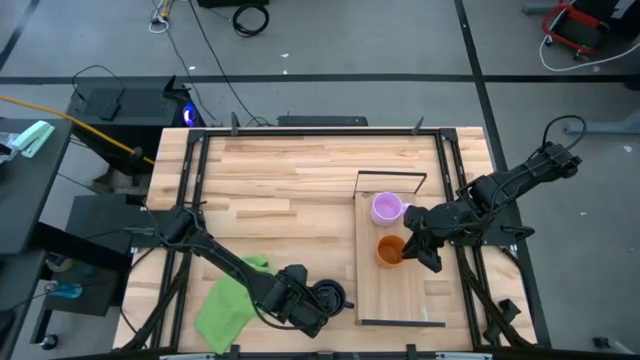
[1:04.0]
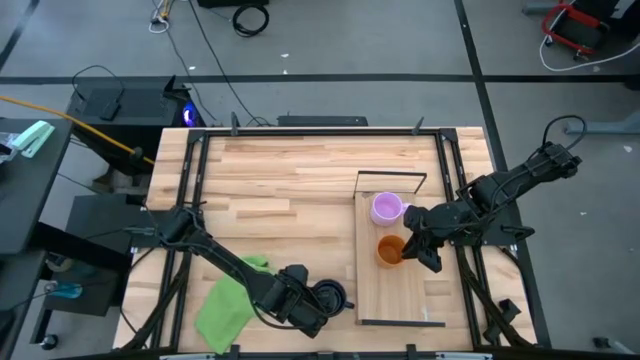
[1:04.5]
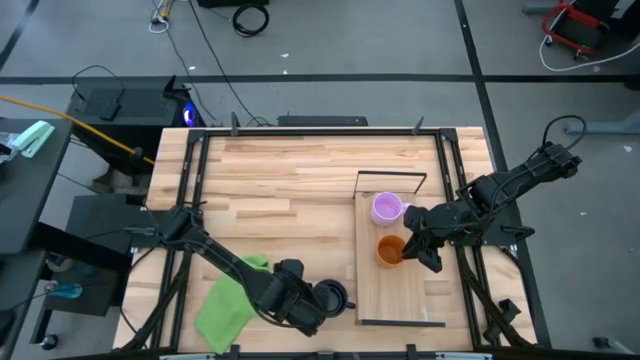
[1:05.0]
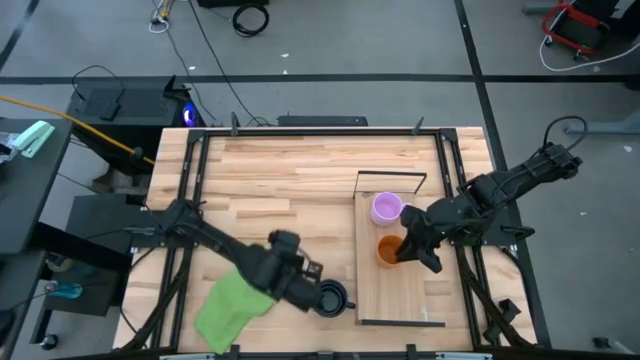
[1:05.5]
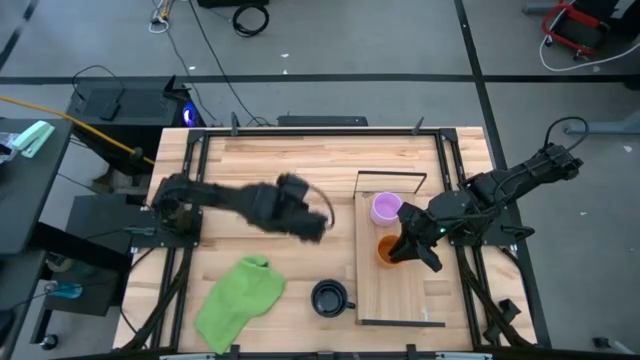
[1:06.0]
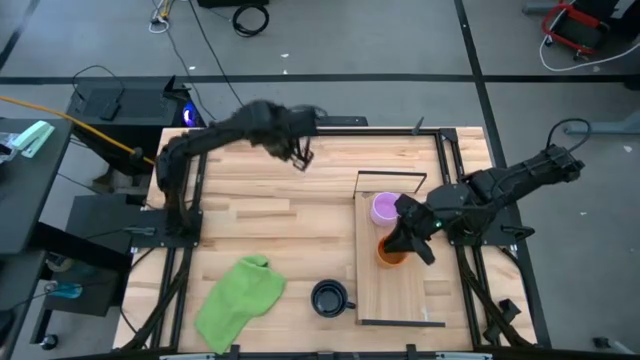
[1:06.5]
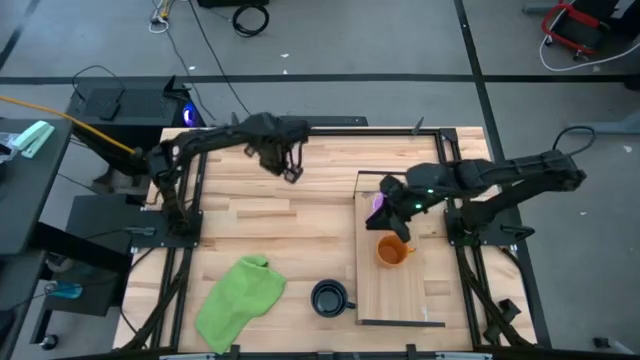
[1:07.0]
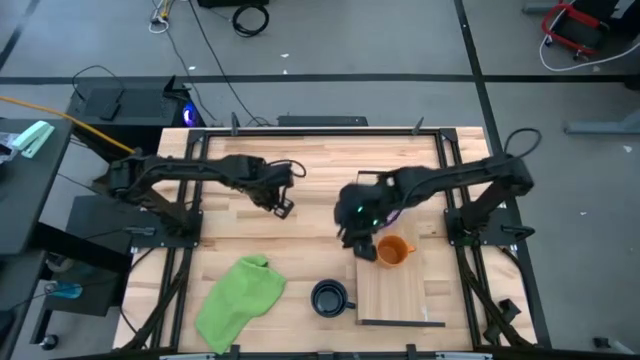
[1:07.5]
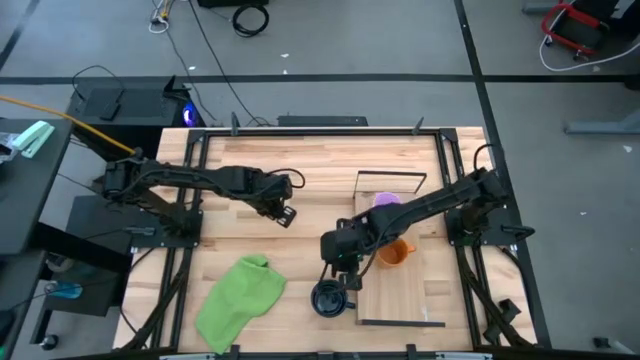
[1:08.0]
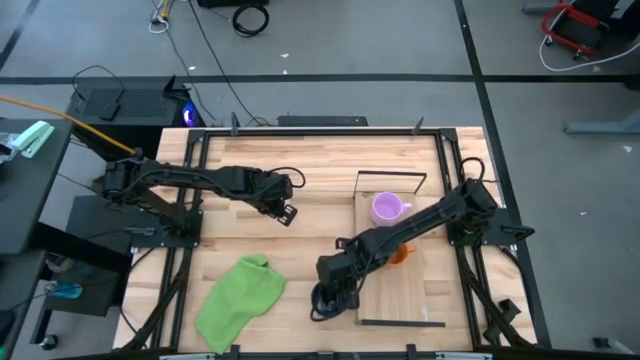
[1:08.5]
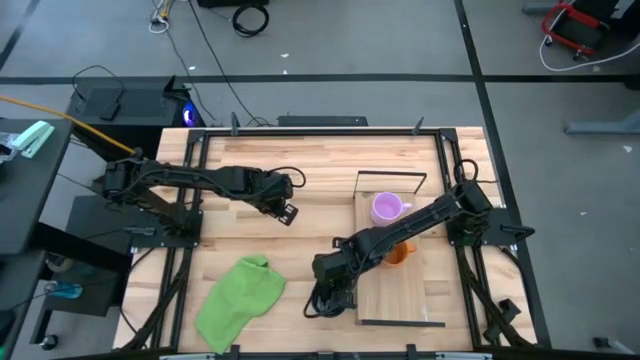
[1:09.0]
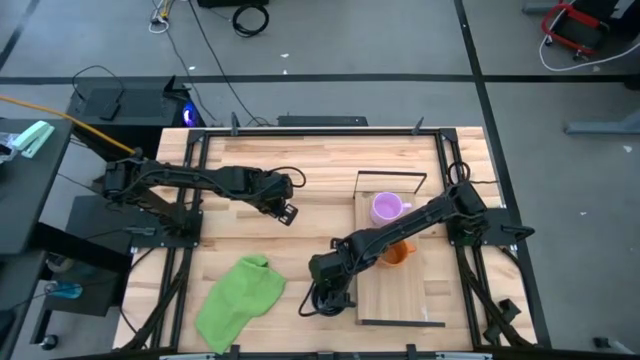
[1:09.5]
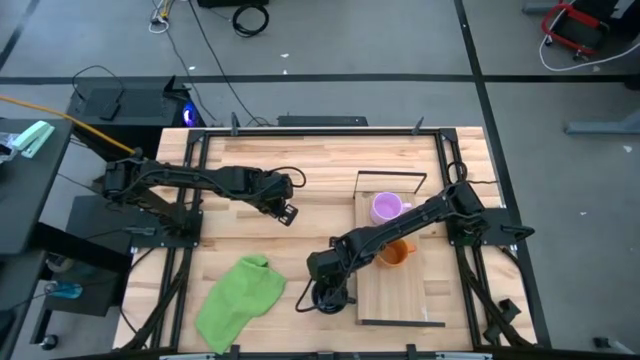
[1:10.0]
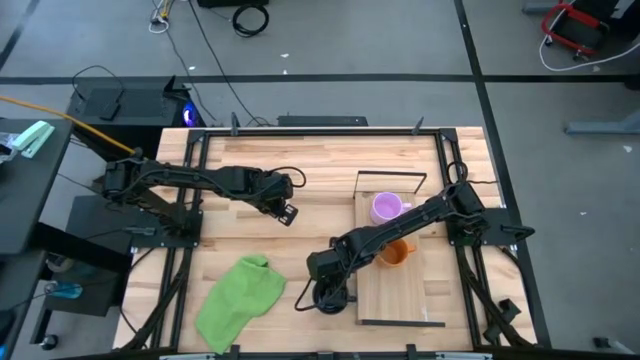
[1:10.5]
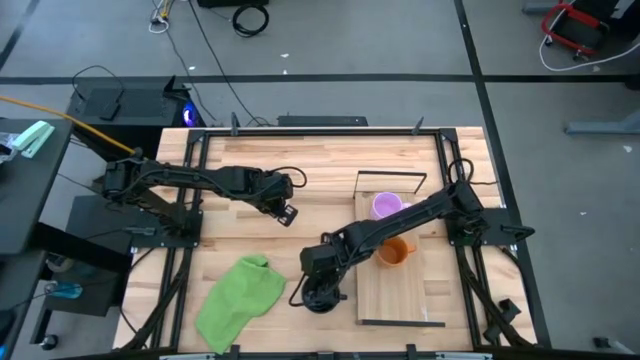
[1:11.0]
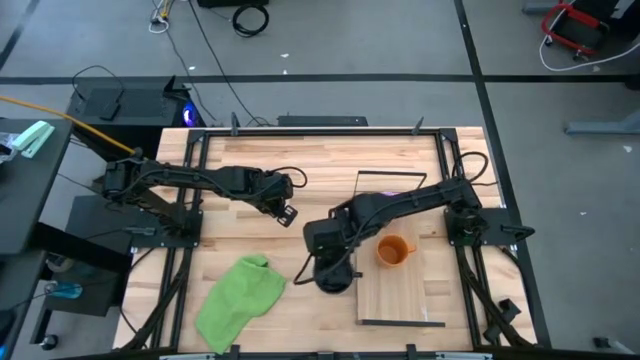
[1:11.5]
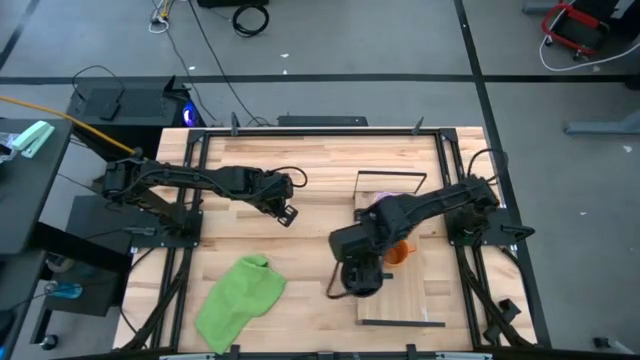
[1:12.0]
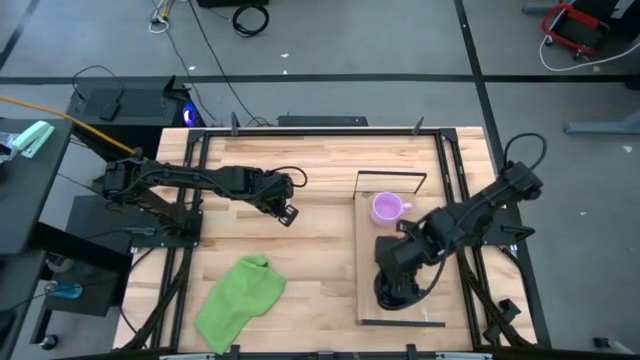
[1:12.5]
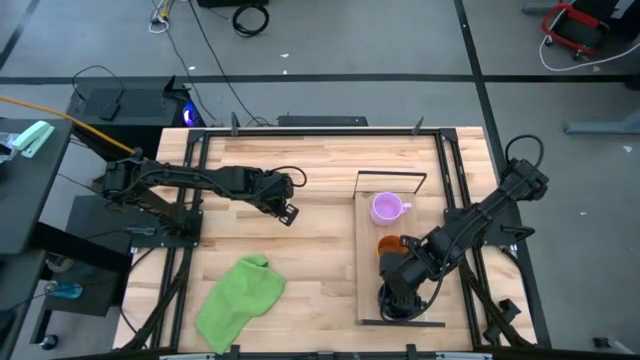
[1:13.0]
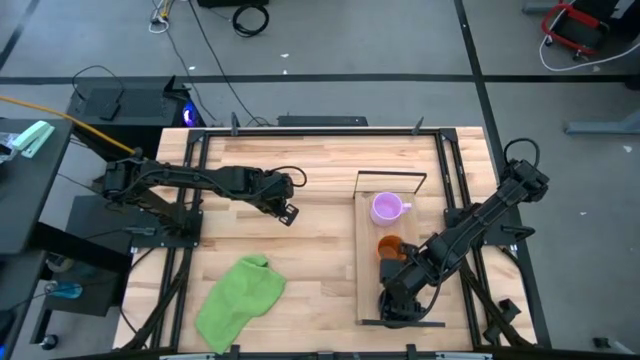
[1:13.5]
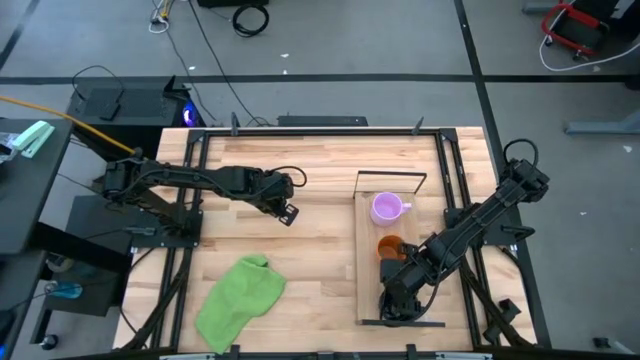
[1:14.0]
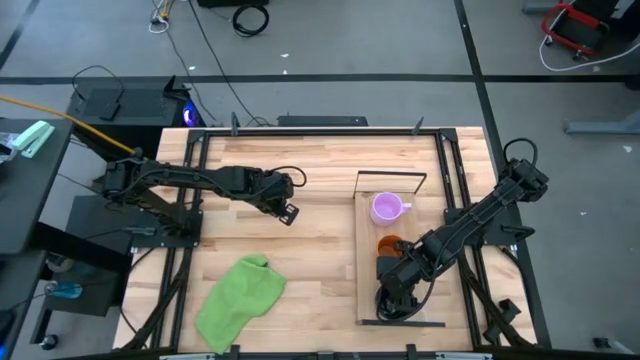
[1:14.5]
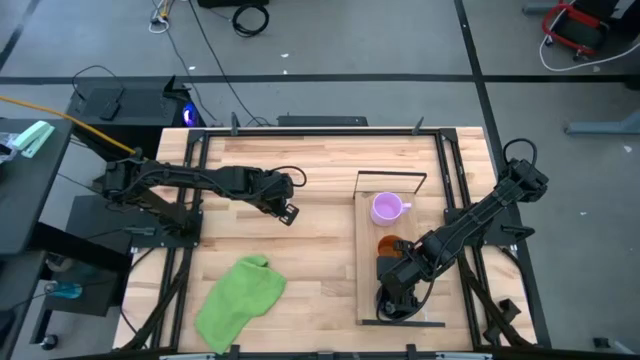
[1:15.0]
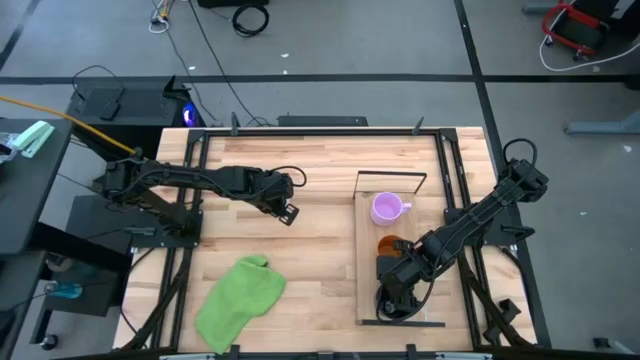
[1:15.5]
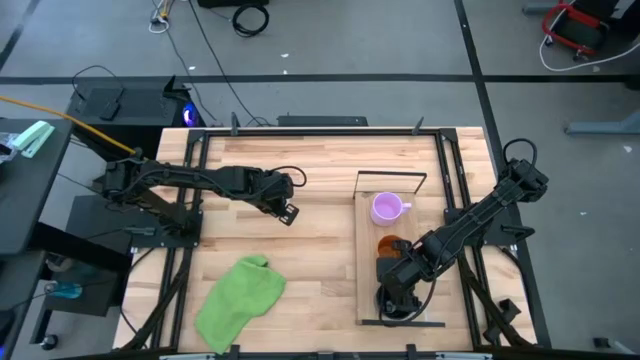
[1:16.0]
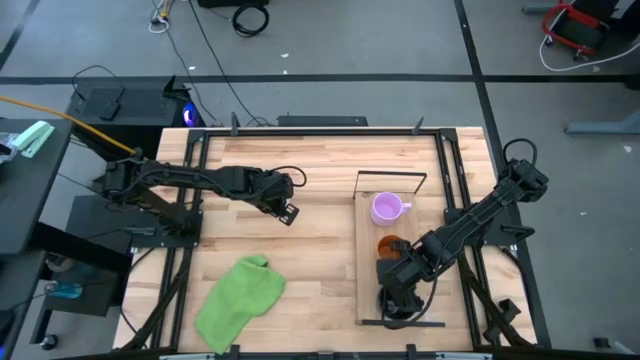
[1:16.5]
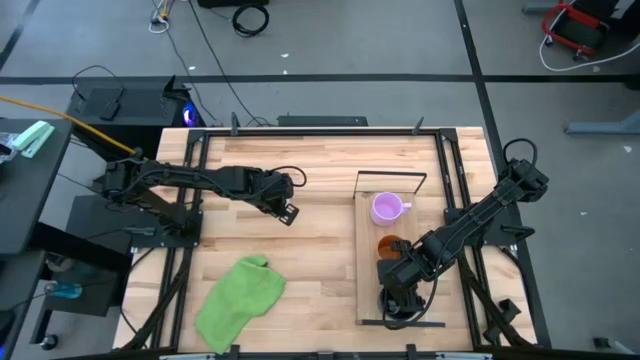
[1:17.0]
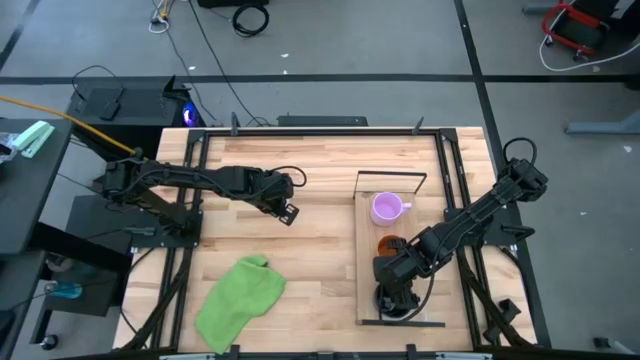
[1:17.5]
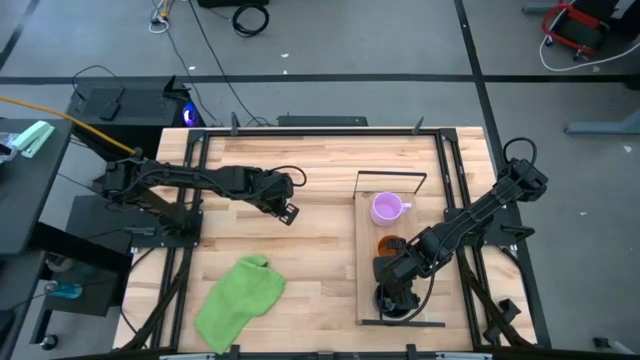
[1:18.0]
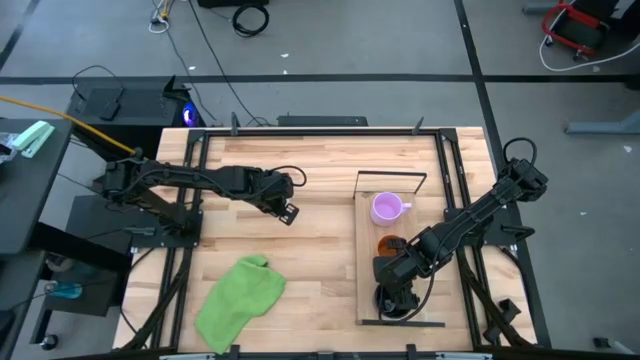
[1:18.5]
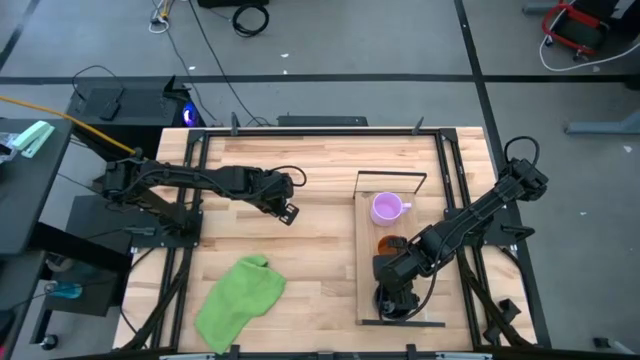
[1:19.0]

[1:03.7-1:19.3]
Task: Stack small to large cups/mugs on shelf
Put the black mug on the shelf

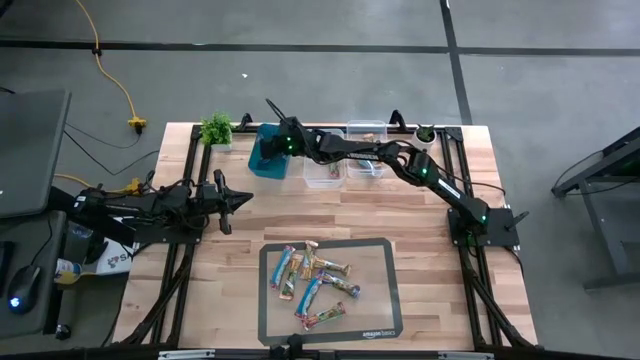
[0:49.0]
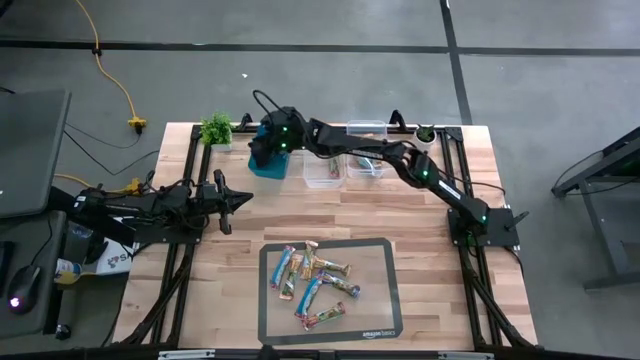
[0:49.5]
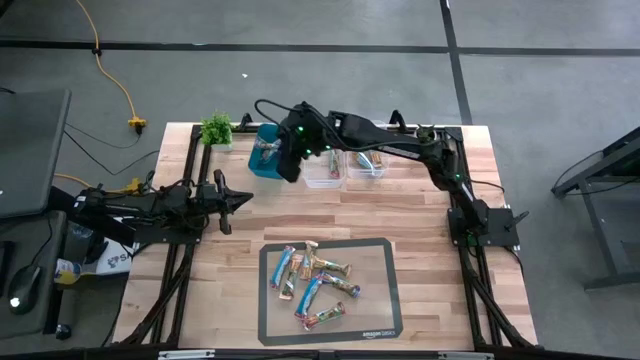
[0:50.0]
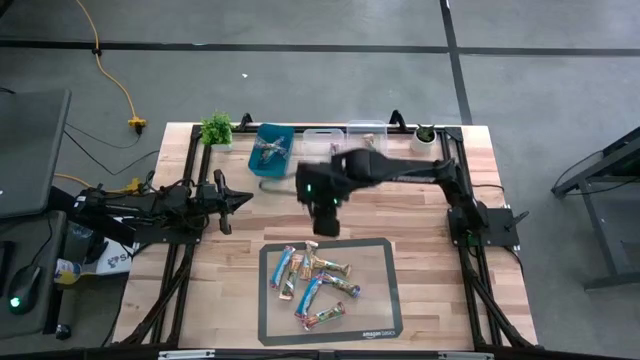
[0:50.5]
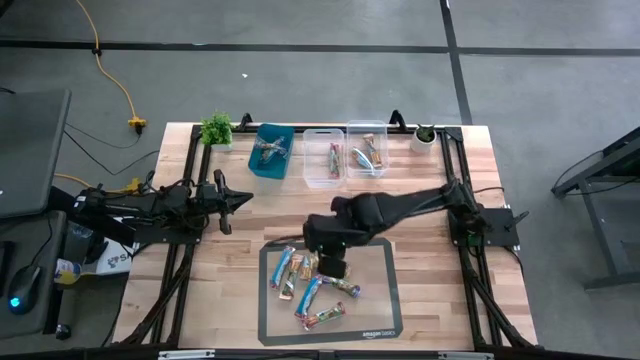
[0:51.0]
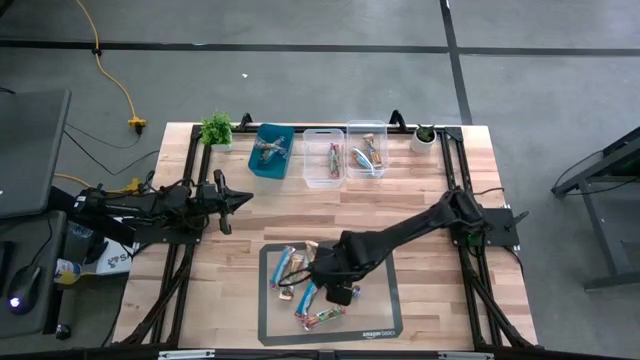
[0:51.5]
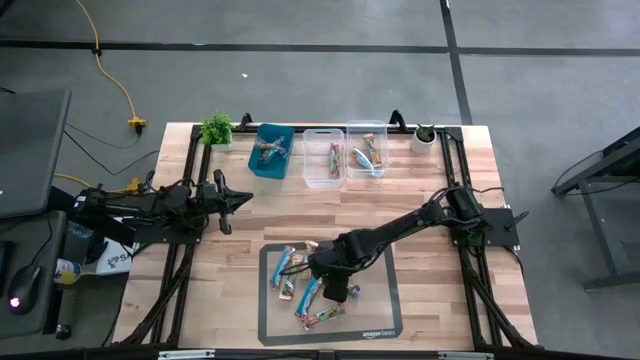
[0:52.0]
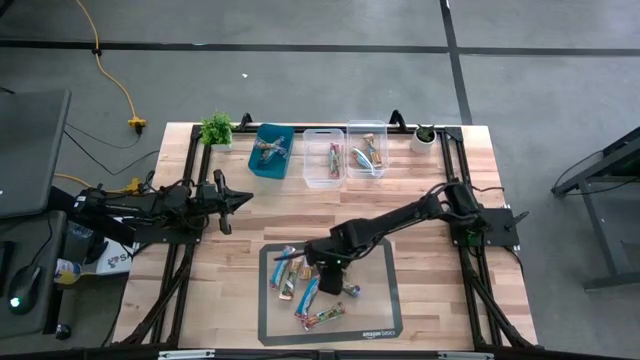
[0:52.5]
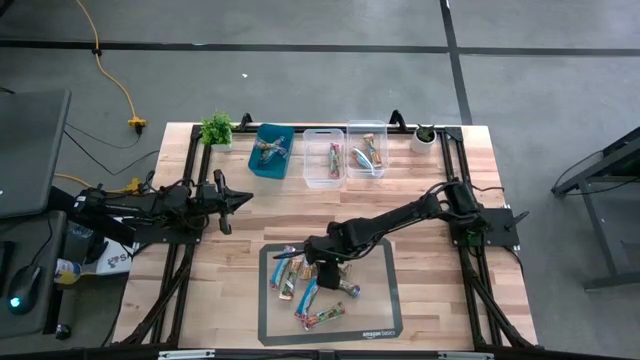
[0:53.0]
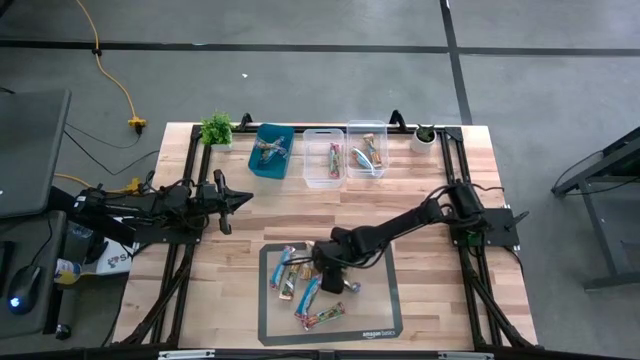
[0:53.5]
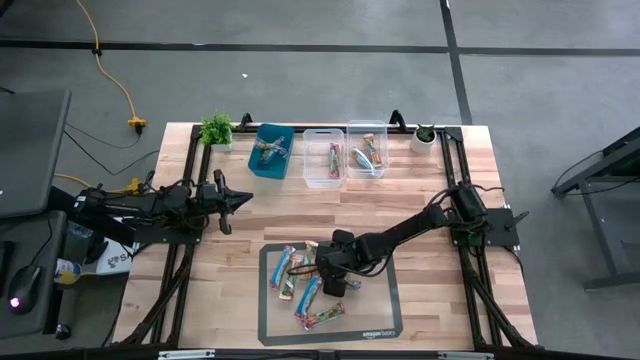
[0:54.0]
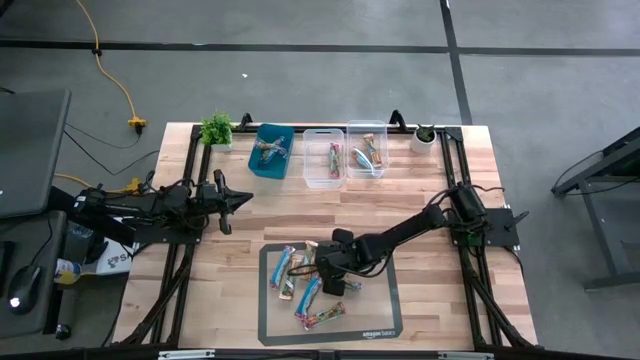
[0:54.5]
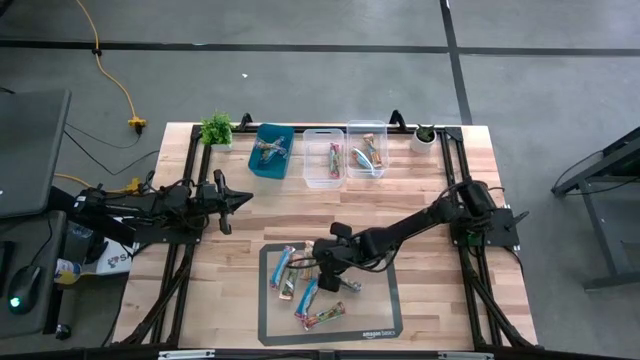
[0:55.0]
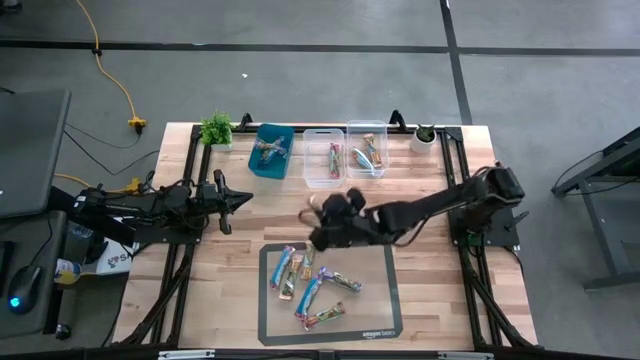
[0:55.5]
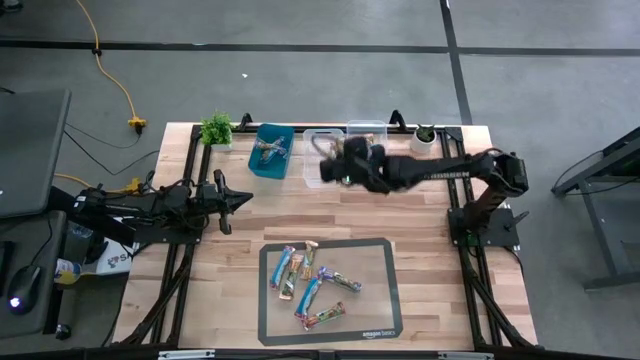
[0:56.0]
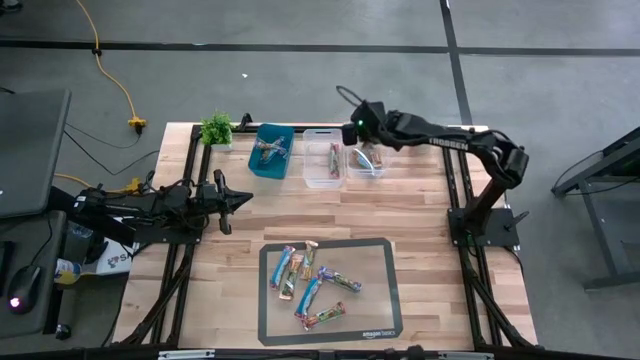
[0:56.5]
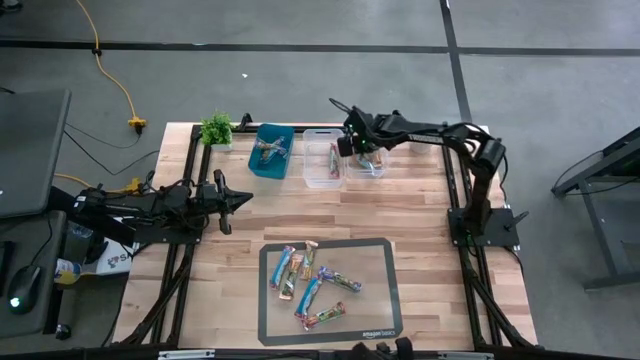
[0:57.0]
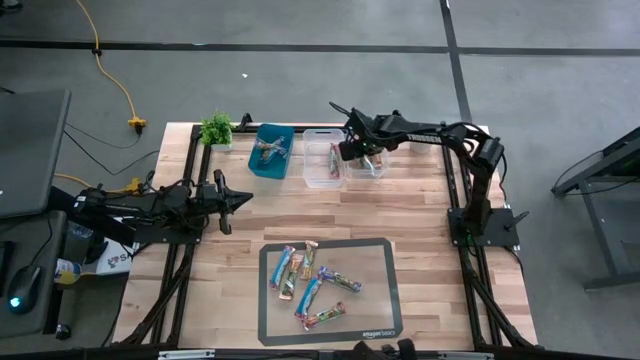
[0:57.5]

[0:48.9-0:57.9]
Task: Pick and place Granola Bars by type
Put the right yellow granola bar into the right transparent bin
